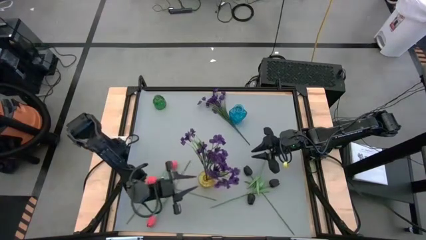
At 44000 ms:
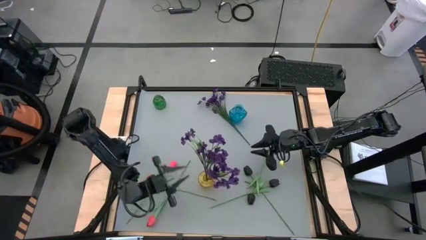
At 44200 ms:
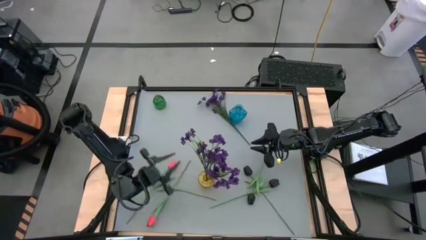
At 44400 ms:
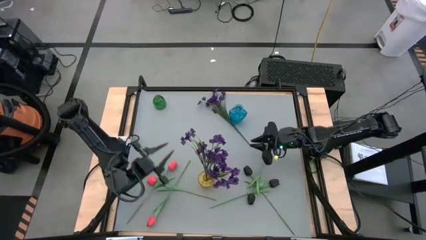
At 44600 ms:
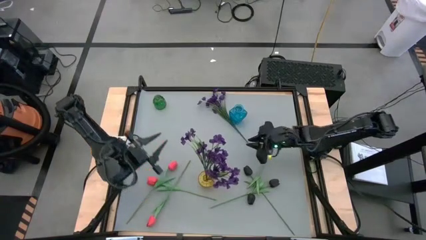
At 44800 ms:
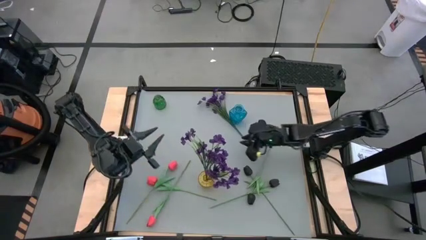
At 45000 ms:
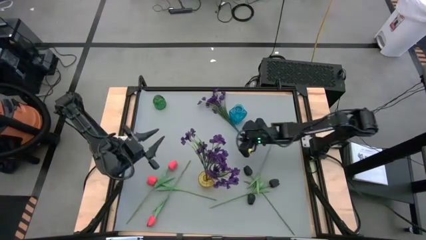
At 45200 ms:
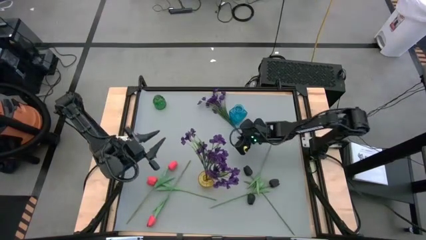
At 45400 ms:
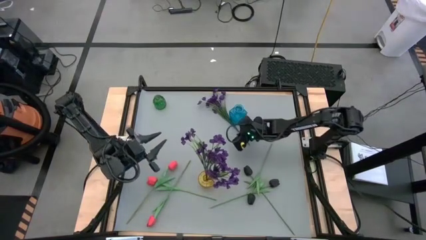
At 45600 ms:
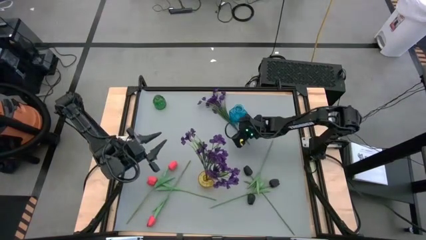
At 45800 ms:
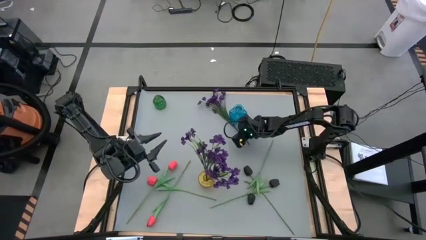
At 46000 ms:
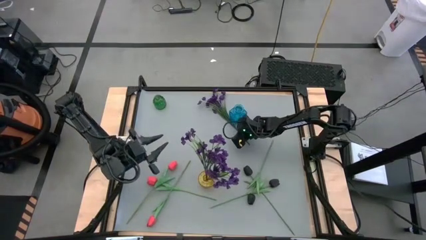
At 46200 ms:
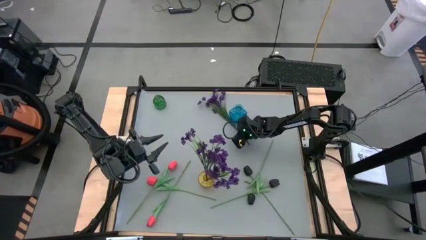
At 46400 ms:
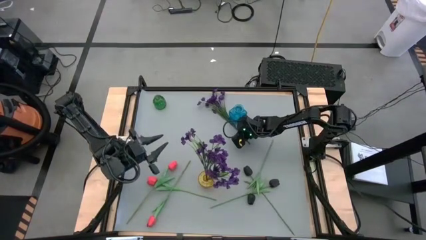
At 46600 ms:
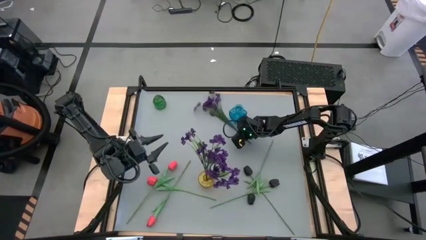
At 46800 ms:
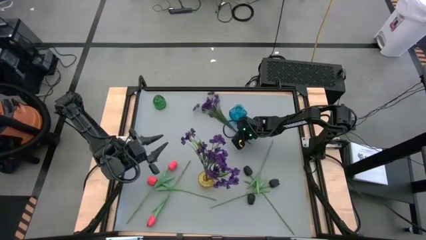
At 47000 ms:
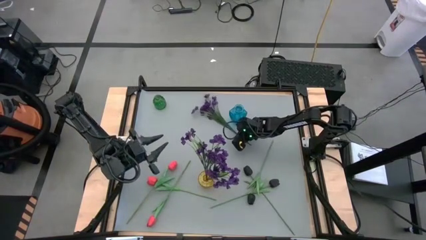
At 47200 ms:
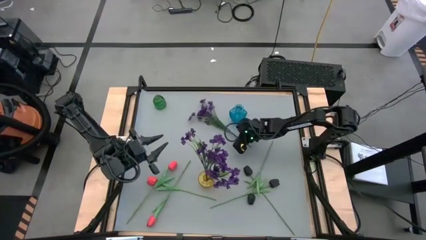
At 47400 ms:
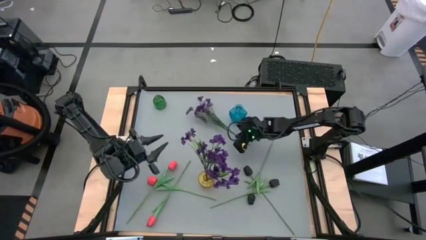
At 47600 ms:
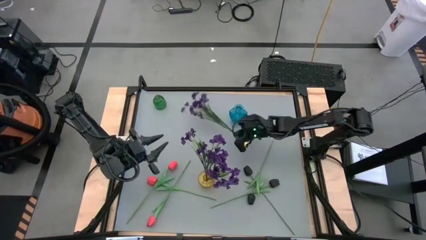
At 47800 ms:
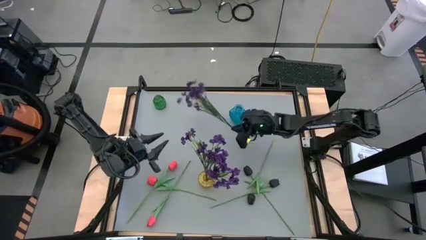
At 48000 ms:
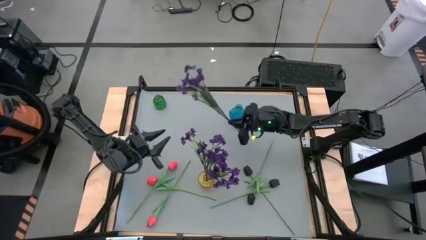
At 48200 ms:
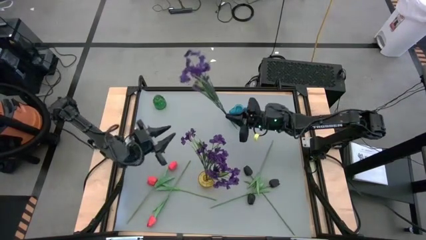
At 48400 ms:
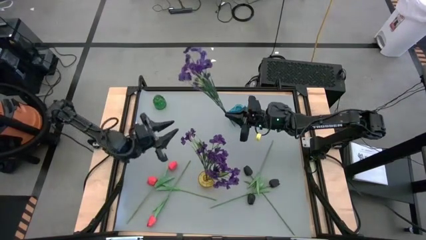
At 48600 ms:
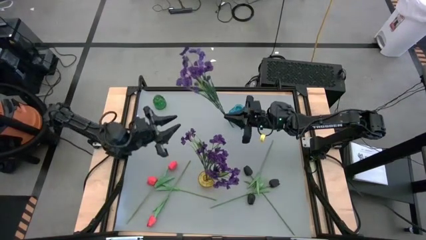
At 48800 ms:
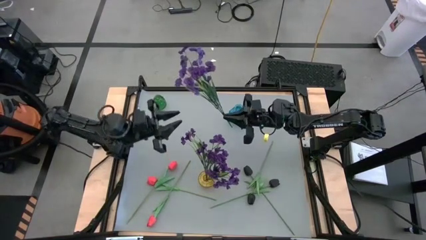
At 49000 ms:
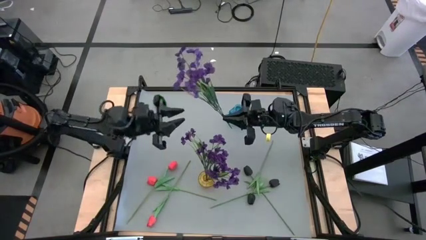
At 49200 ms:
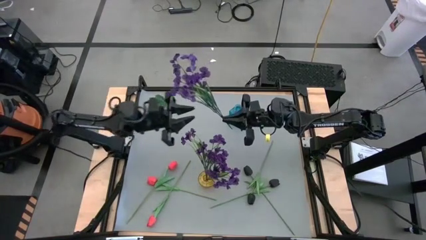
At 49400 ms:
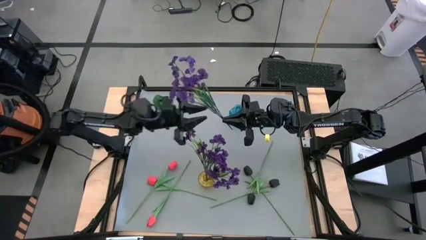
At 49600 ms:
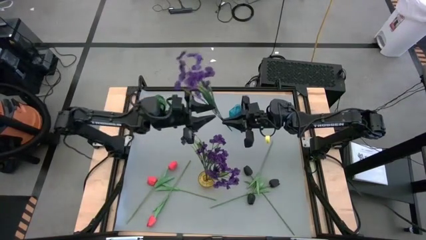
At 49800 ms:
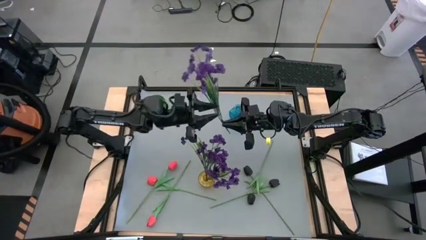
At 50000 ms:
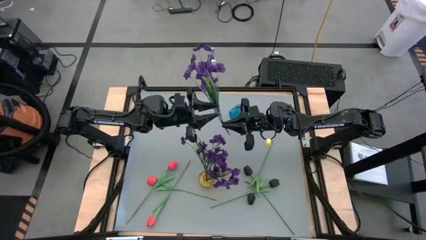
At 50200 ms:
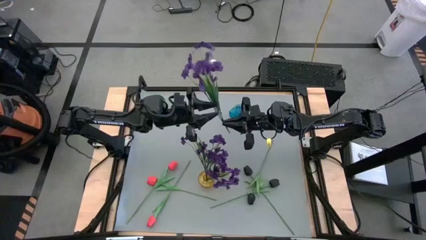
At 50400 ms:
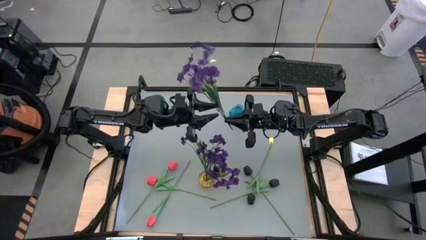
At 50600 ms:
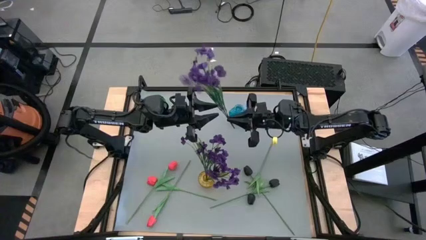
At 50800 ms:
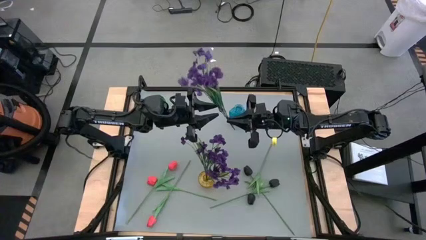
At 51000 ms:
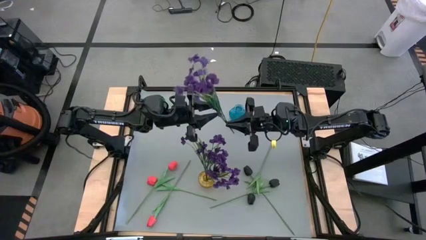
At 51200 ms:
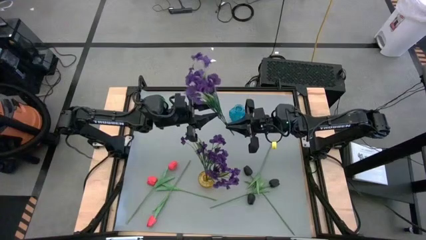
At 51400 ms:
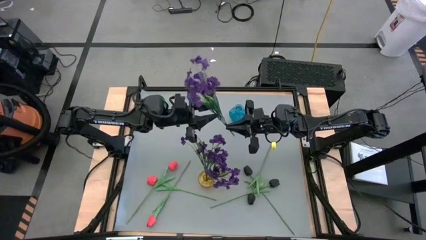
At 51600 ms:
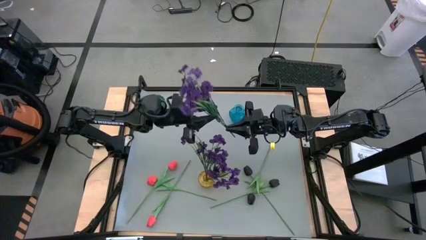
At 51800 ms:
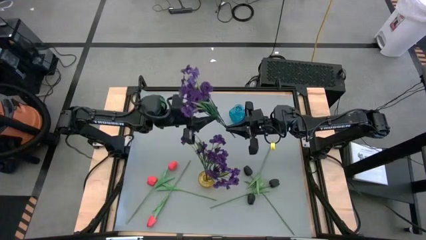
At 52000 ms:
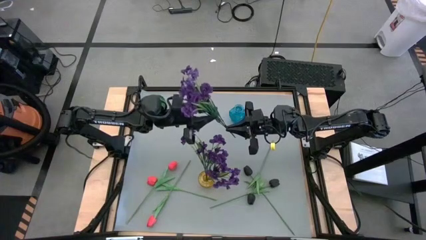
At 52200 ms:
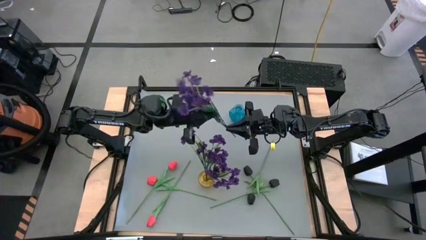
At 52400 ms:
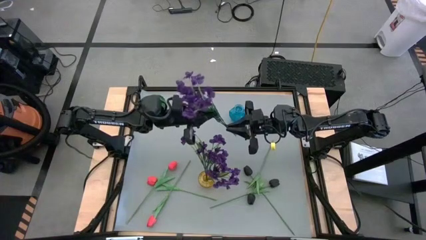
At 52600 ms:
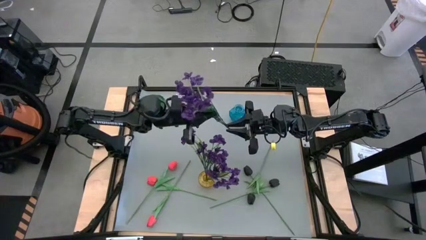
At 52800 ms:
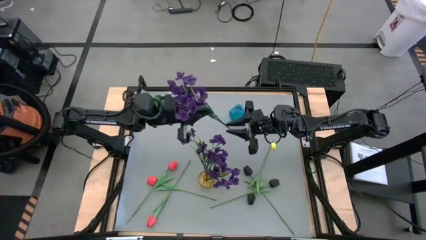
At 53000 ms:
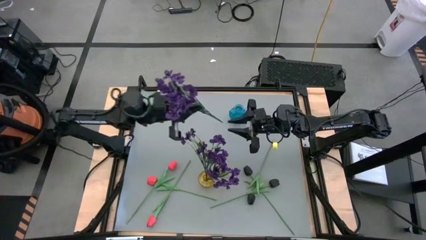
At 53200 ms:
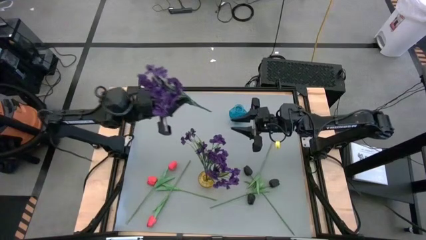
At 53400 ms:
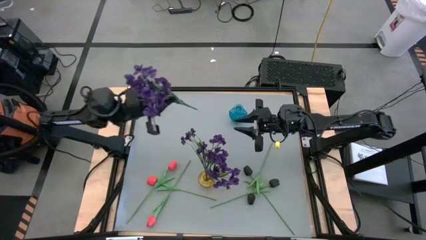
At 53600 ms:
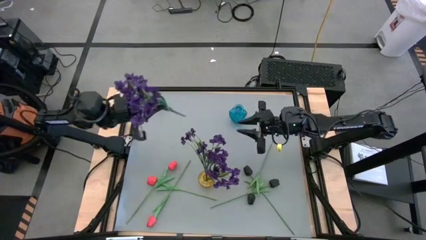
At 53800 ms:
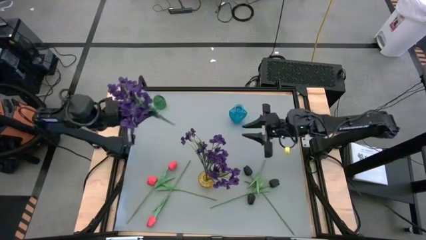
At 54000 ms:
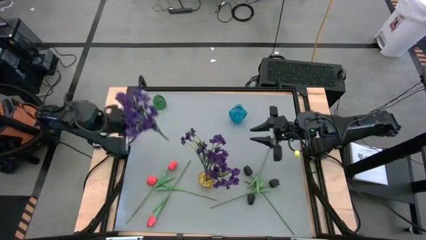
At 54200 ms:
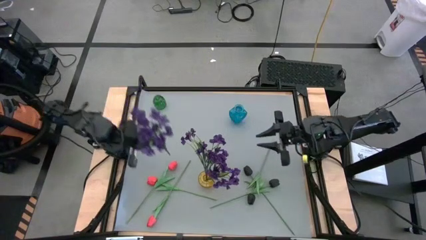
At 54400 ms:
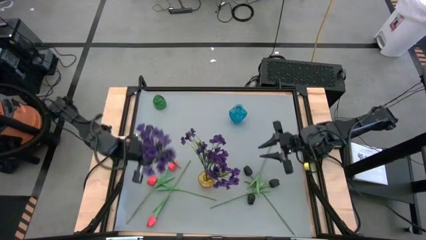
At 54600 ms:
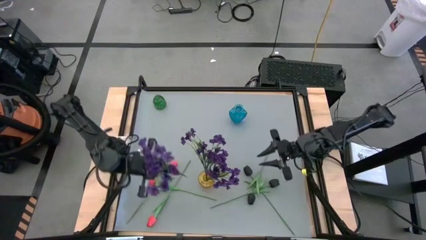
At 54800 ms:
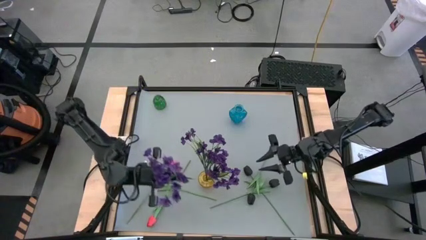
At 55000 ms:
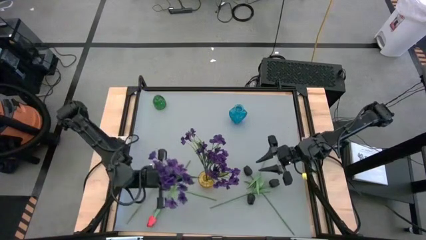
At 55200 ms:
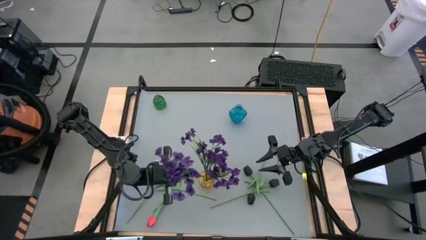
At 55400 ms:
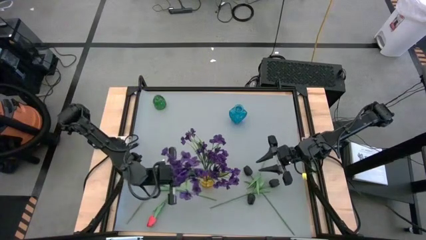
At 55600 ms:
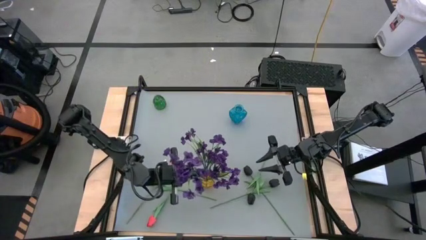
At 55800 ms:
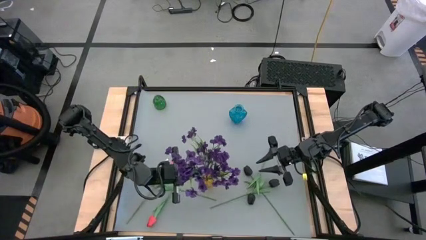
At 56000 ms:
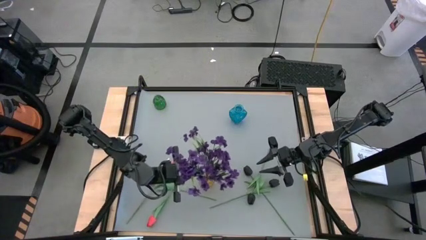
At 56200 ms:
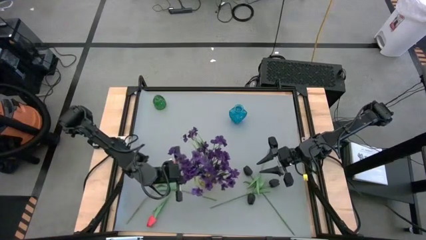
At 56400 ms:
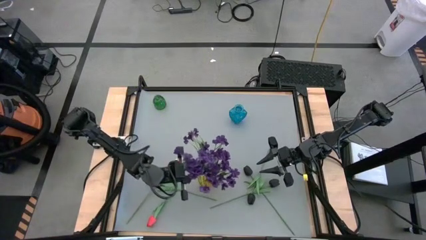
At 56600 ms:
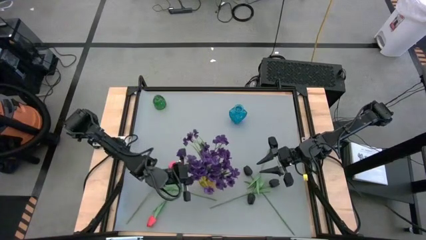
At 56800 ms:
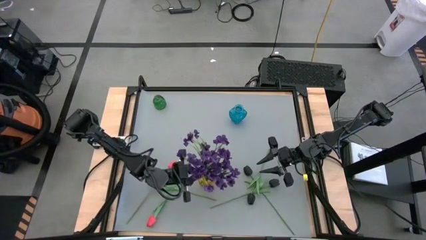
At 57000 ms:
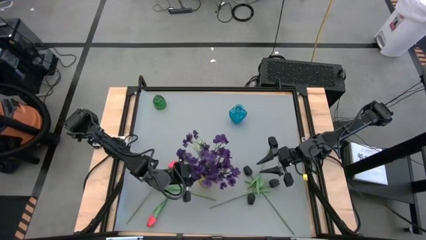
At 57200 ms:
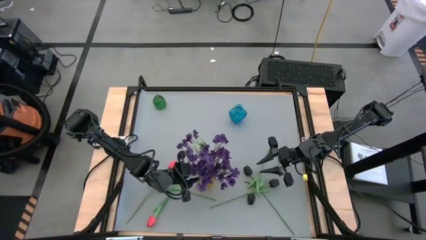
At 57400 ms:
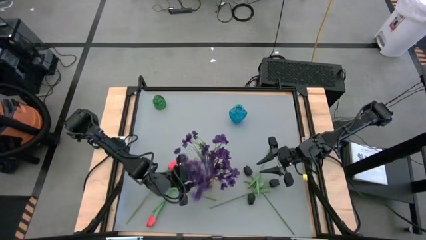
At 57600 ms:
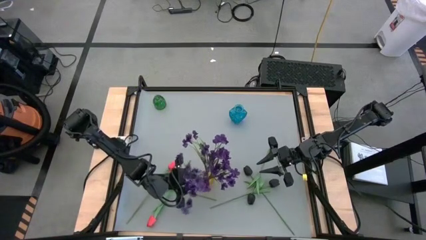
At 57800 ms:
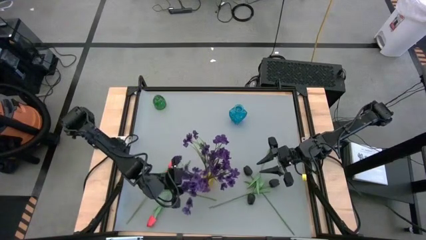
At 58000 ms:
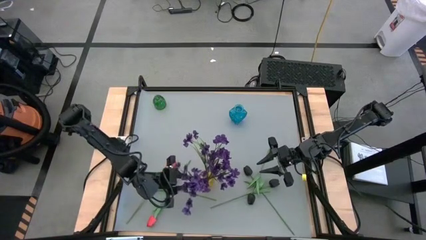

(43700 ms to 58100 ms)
Task: Sort flowers into vase by color
Put the violet flower into the yellow vase
